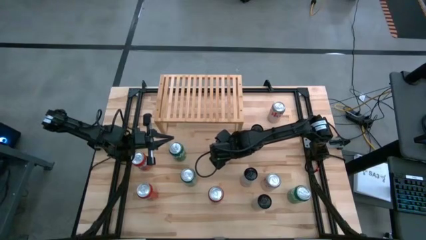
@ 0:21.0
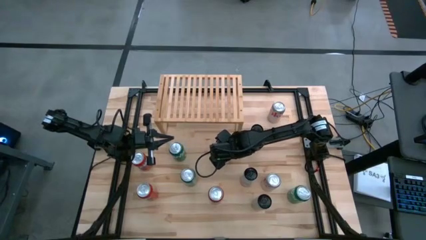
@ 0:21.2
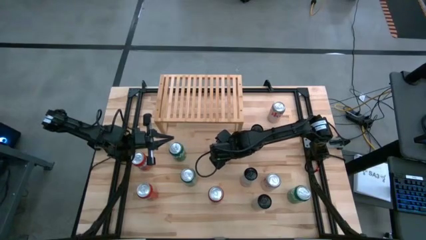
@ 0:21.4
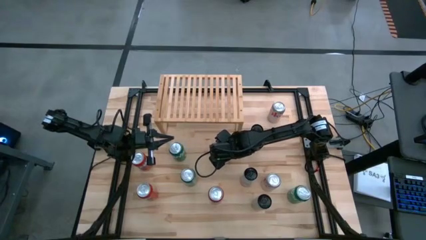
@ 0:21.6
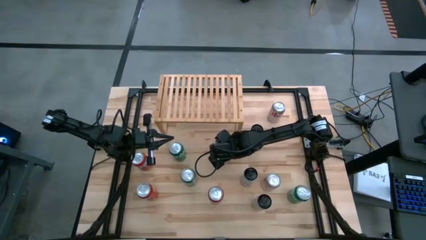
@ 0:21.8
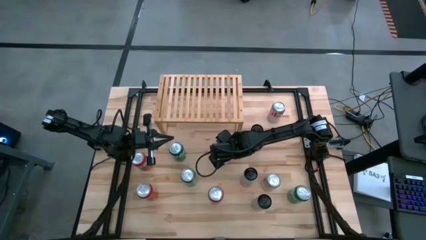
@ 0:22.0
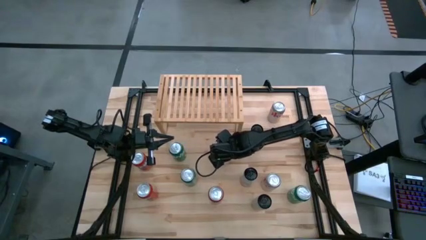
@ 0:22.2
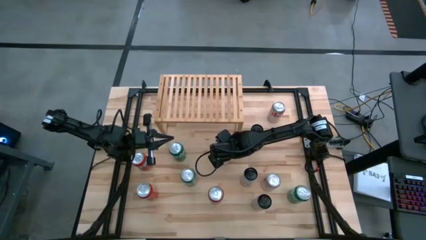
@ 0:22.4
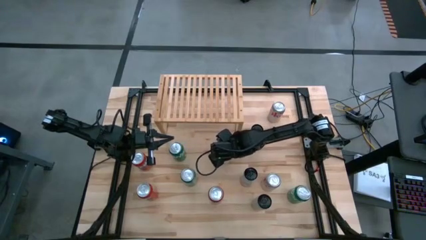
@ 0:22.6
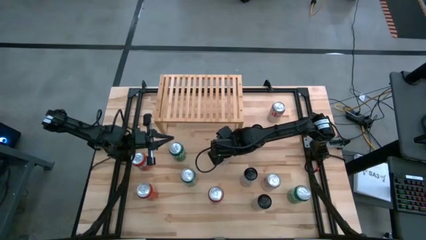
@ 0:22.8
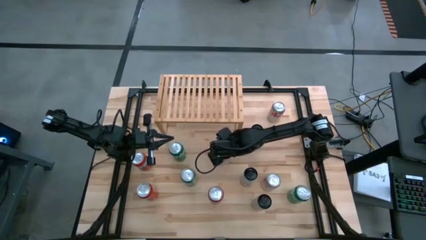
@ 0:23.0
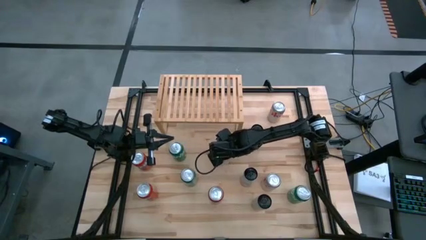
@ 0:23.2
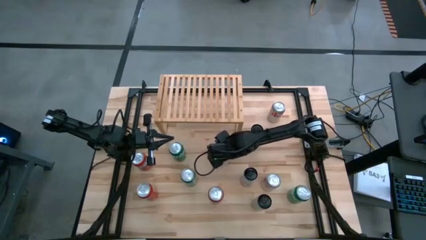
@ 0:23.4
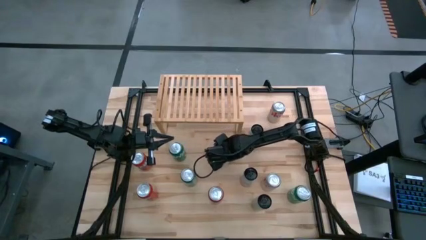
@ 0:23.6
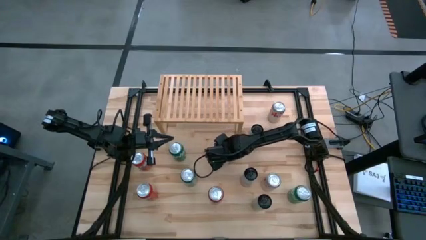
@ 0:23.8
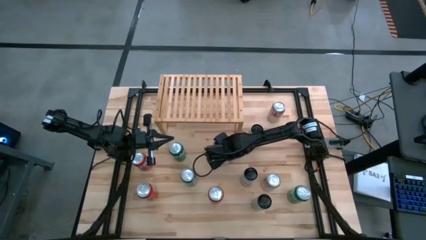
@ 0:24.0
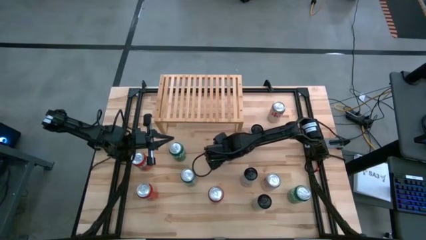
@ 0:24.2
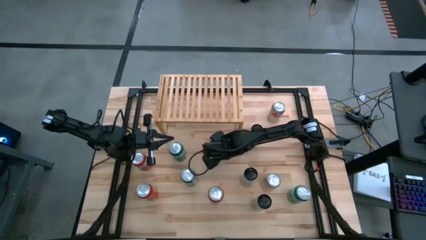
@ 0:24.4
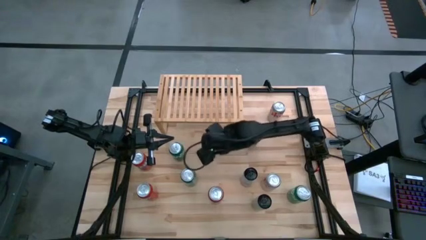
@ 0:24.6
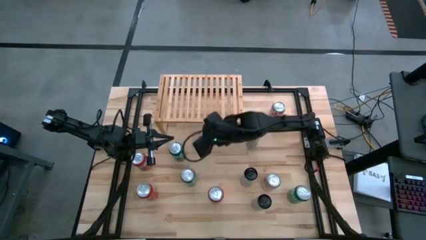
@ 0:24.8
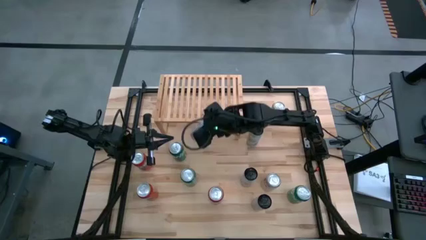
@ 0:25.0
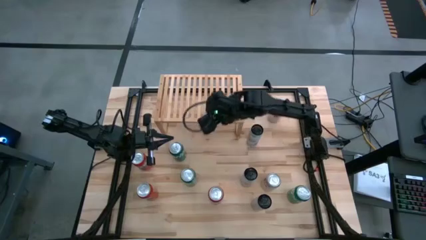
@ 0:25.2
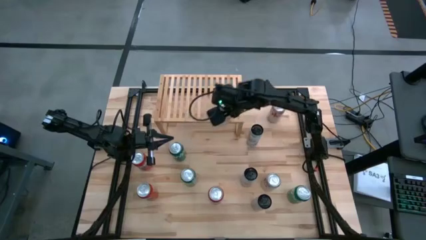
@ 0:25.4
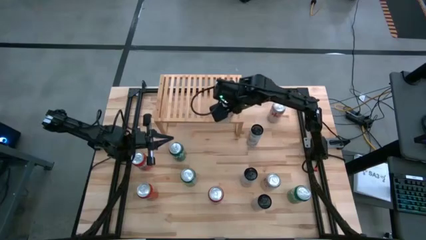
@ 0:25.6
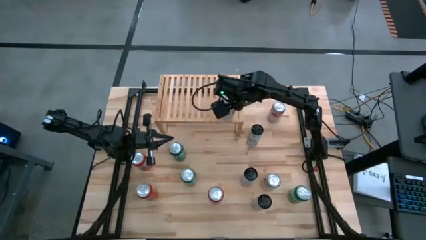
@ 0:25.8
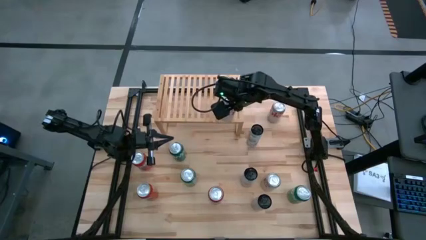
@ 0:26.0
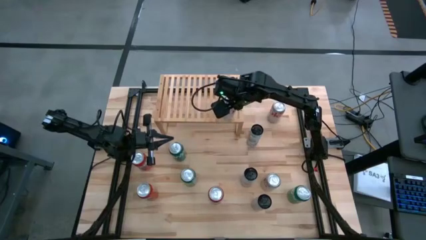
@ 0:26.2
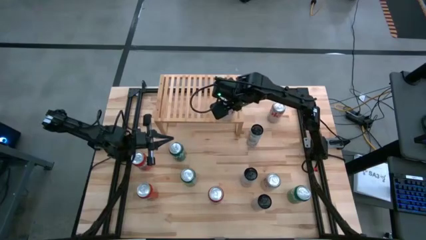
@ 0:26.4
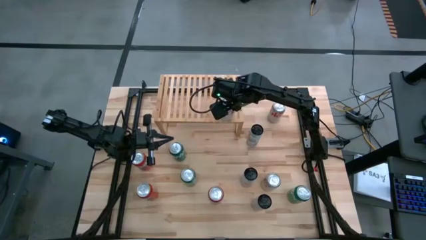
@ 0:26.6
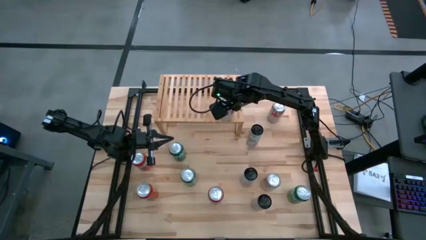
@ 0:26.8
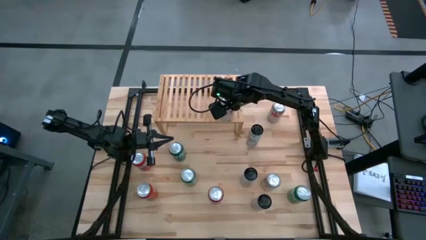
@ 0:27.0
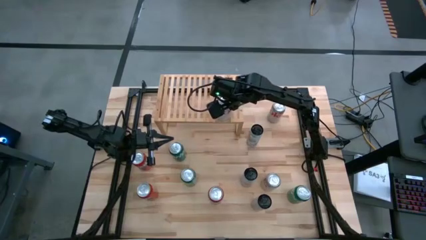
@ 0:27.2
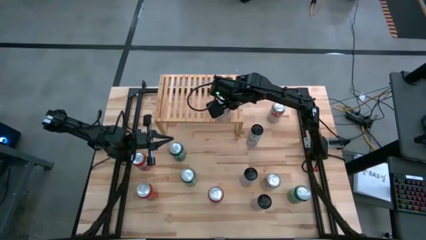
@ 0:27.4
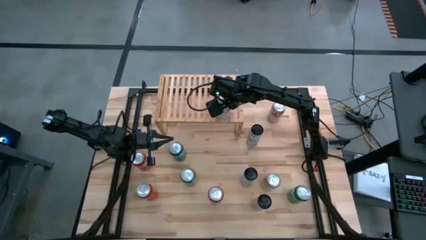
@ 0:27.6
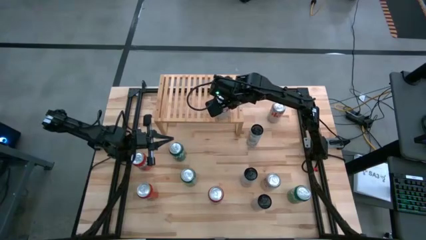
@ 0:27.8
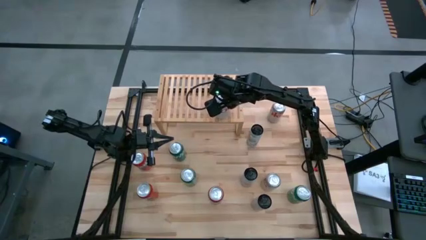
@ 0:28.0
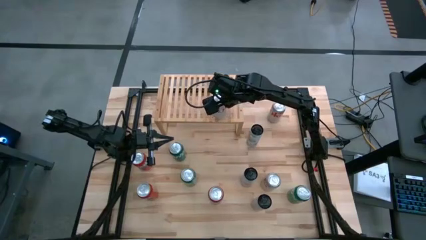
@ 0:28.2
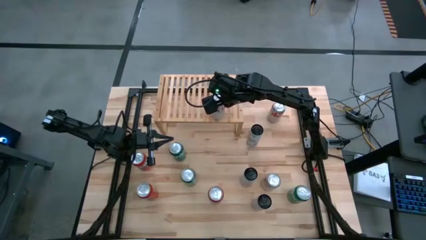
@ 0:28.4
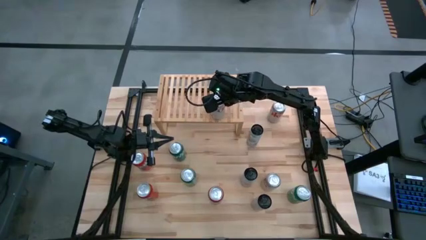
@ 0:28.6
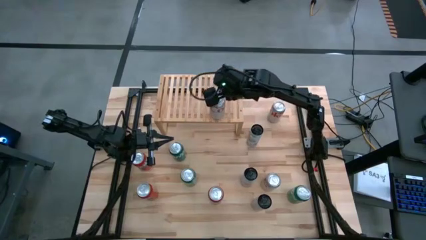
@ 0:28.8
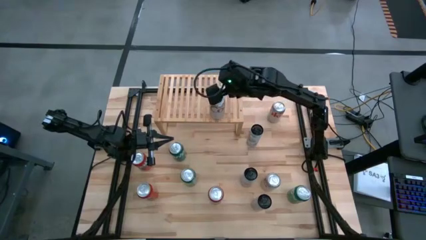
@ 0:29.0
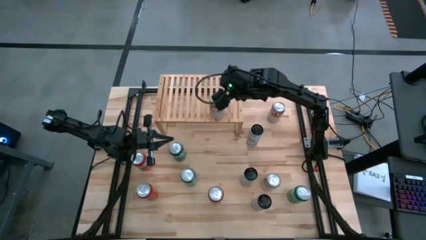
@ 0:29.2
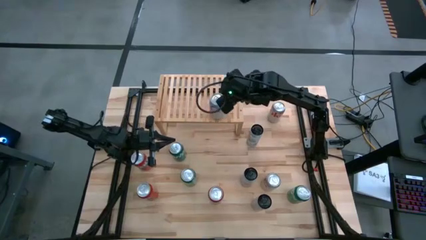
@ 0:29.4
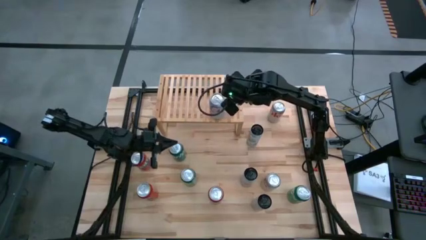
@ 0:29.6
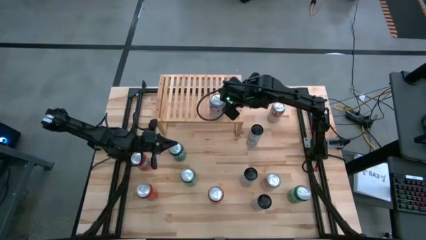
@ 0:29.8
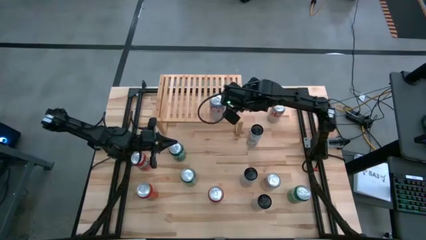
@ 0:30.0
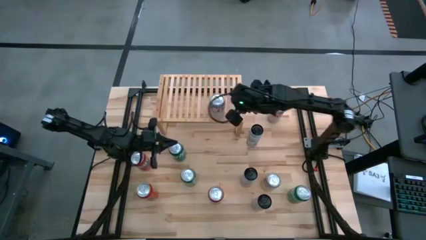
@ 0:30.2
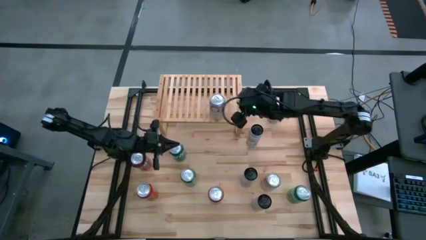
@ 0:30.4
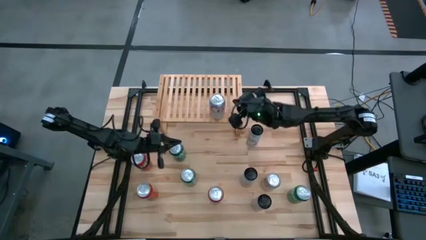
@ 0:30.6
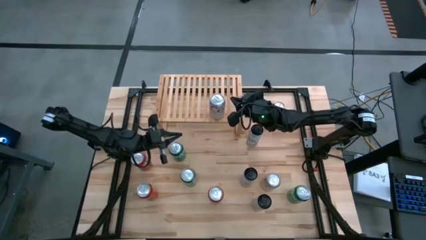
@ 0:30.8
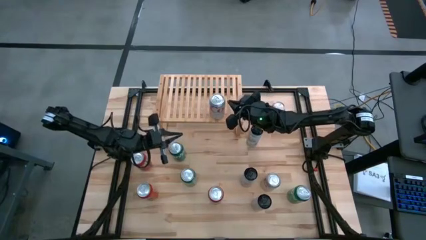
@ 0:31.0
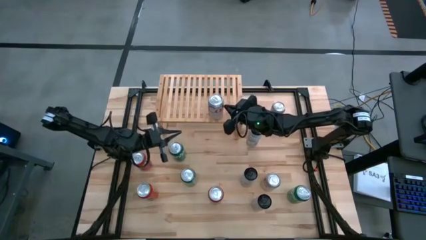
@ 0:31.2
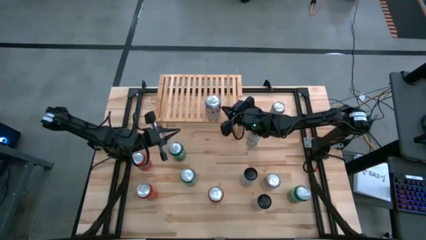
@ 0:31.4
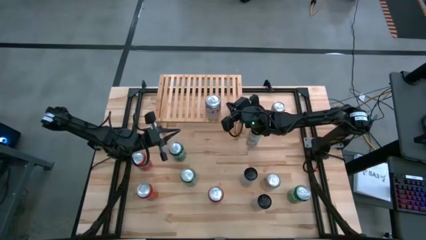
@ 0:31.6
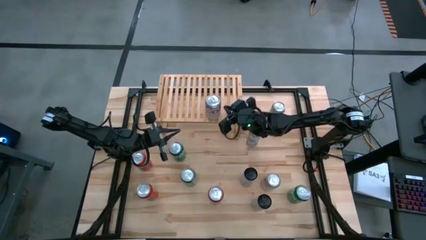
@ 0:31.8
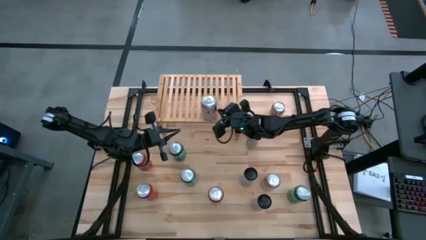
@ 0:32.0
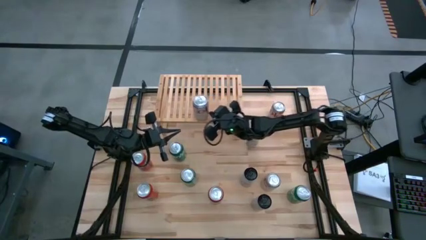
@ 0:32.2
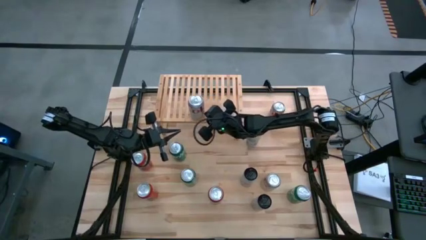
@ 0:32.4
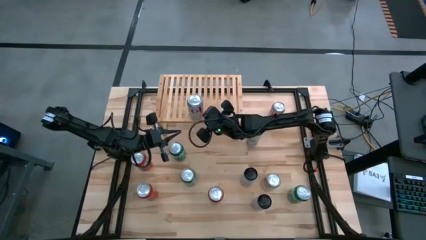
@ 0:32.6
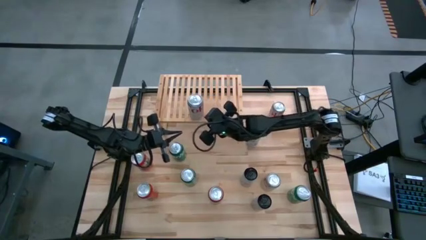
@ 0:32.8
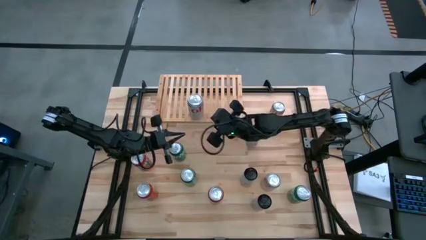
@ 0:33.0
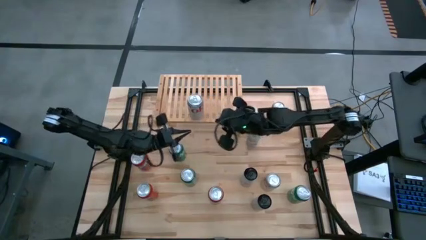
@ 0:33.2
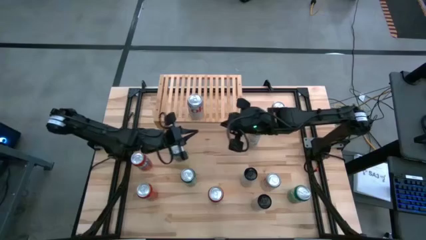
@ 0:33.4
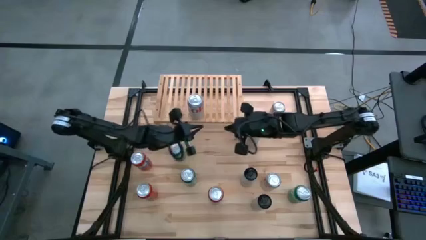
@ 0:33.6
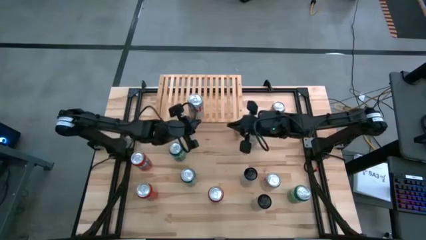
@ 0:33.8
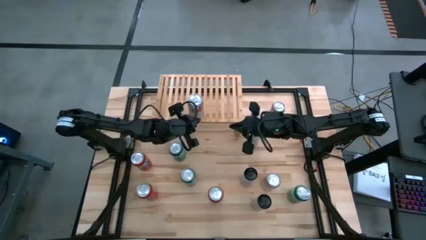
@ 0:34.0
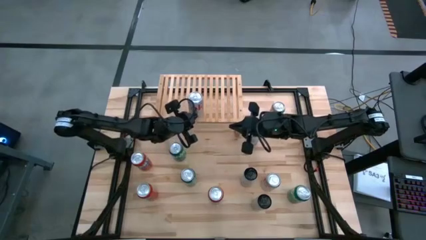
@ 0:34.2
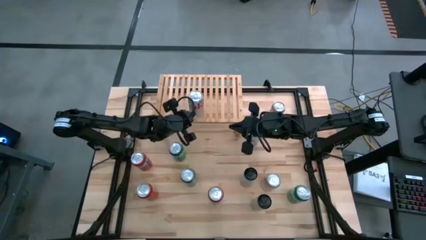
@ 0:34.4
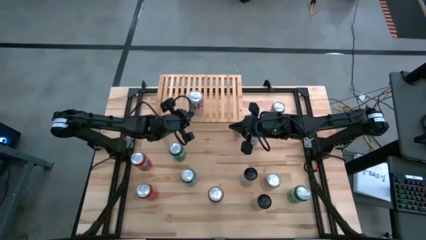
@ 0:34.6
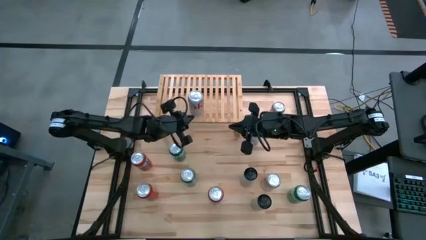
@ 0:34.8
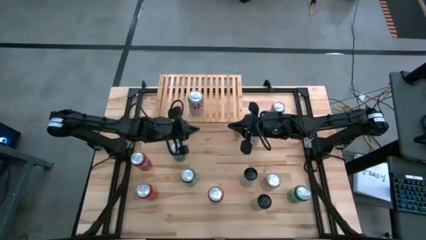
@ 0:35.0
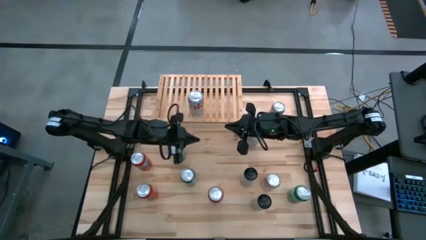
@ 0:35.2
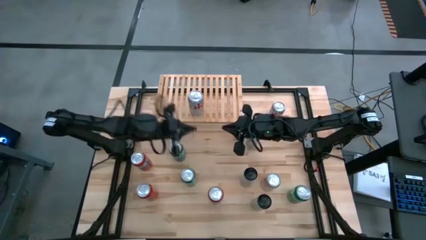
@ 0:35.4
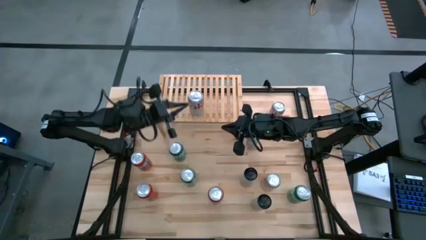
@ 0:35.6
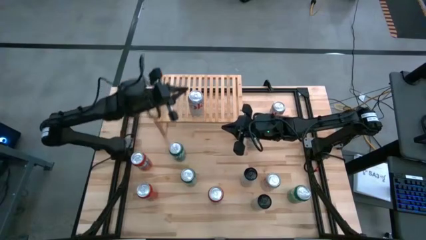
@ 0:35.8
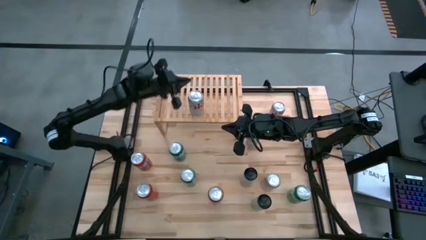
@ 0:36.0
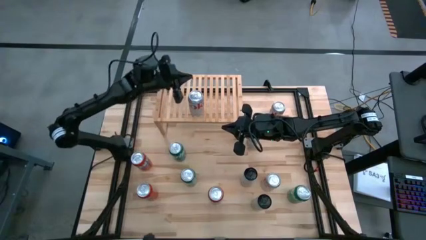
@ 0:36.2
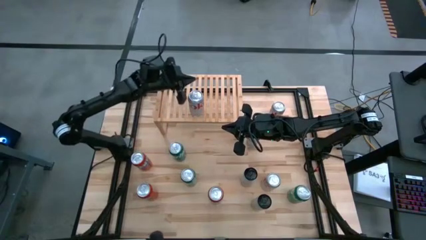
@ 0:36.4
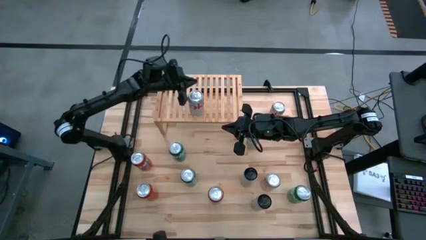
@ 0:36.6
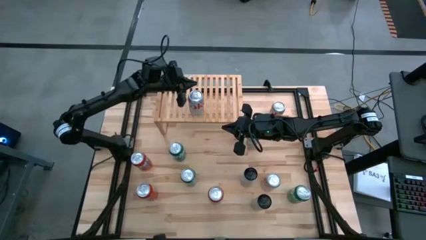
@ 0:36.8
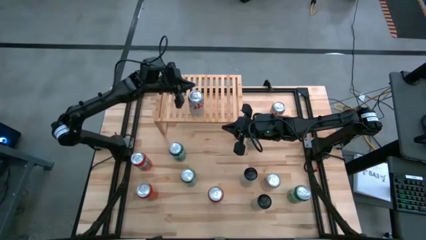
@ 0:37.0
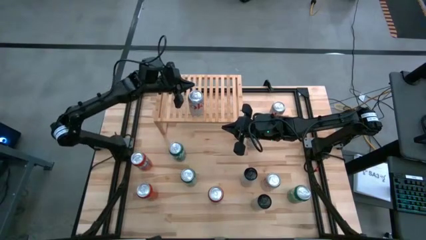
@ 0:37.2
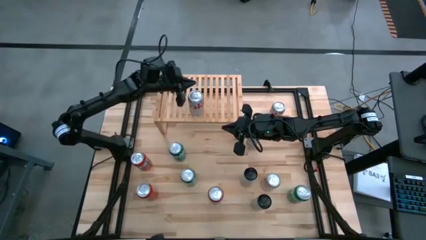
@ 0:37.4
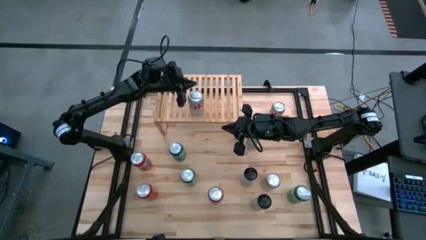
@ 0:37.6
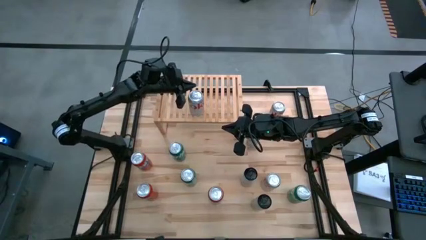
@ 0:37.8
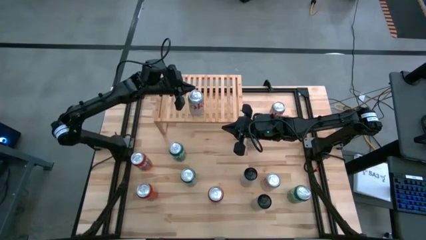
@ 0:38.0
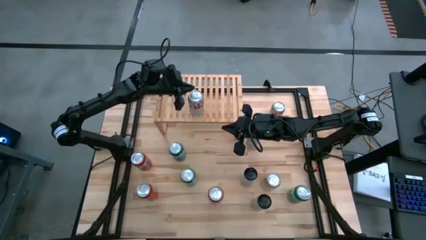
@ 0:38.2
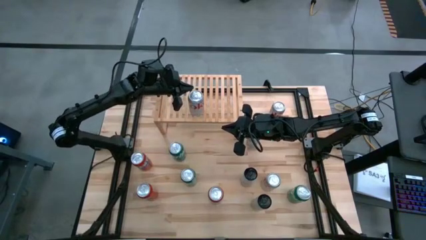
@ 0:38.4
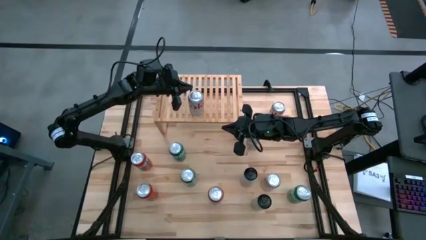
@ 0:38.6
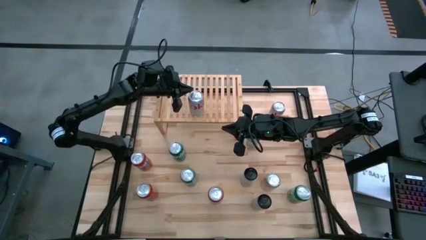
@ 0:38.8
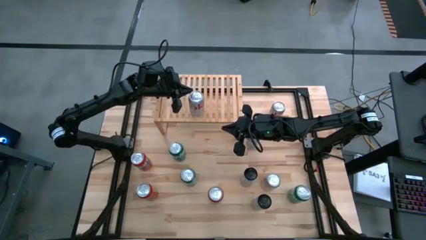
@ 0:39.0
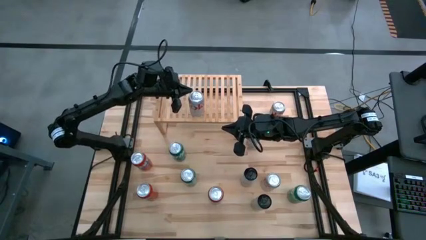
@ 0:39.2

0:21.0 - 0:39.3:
Task: Place canned beverage on shelf
Put the middle white soda can on the shelf
